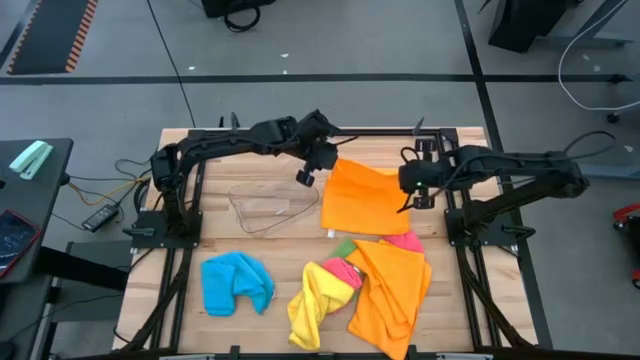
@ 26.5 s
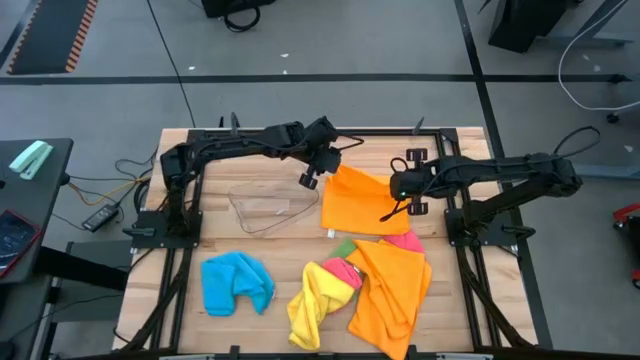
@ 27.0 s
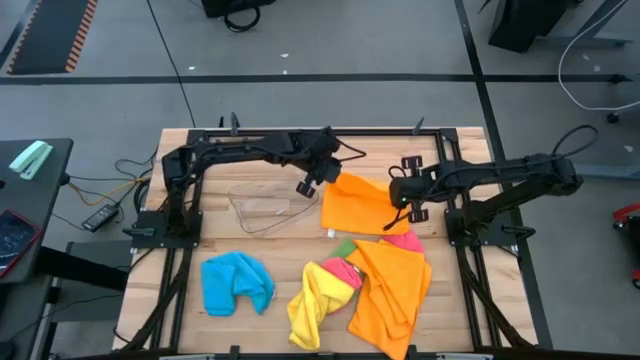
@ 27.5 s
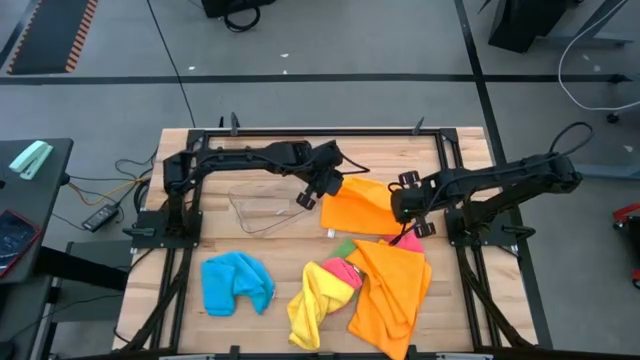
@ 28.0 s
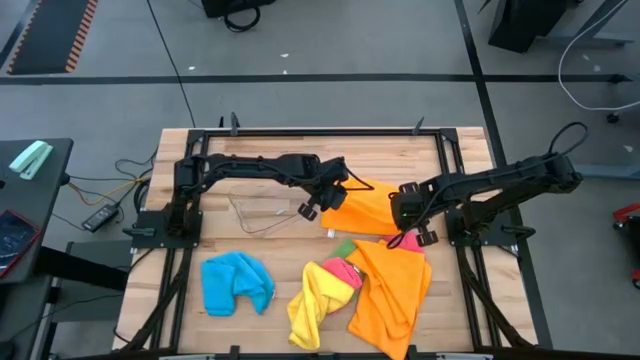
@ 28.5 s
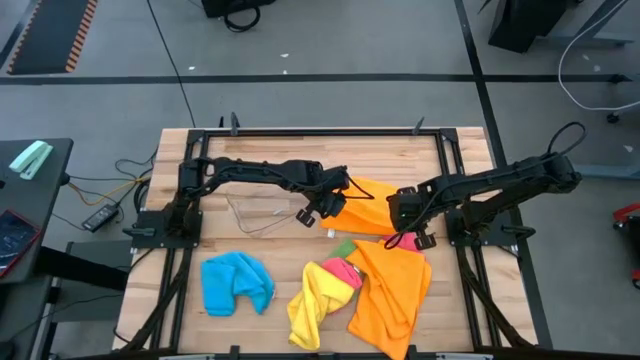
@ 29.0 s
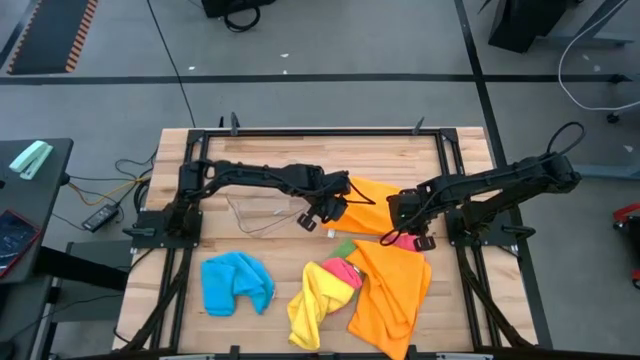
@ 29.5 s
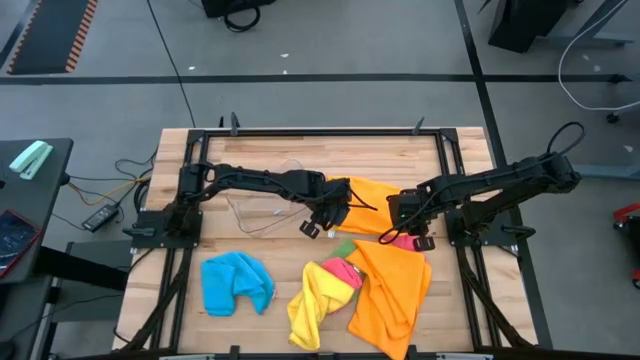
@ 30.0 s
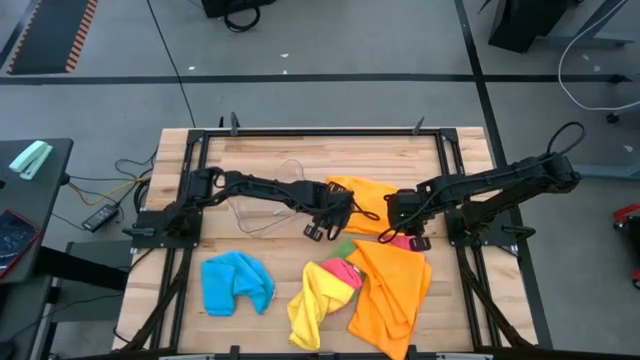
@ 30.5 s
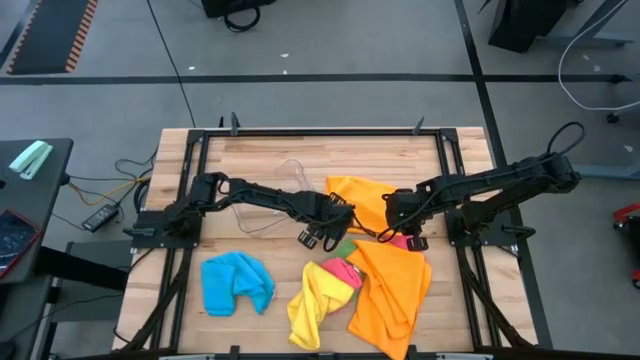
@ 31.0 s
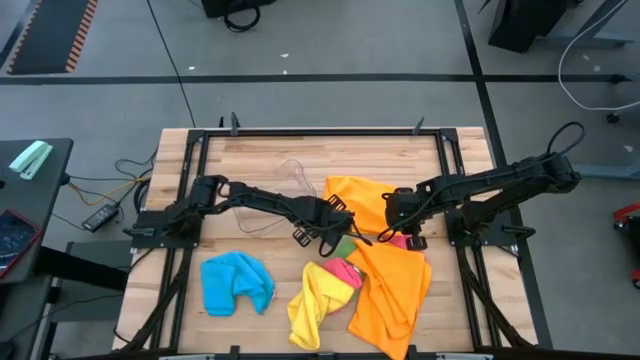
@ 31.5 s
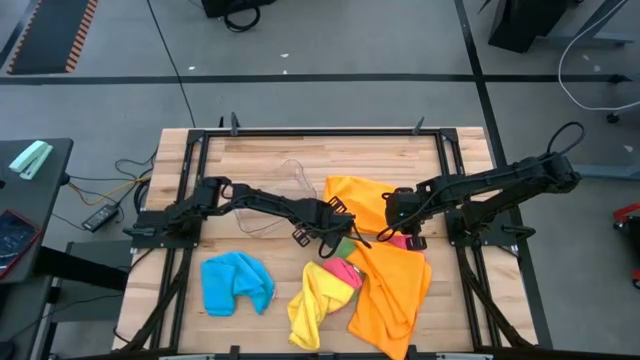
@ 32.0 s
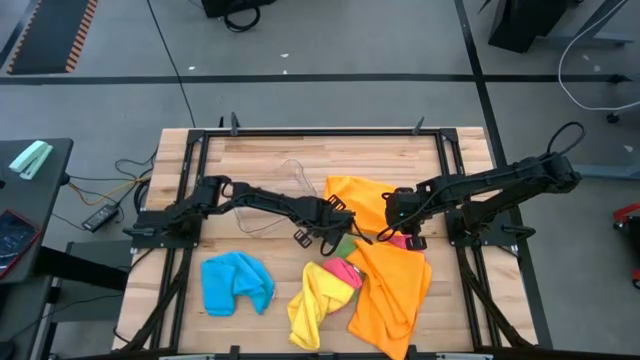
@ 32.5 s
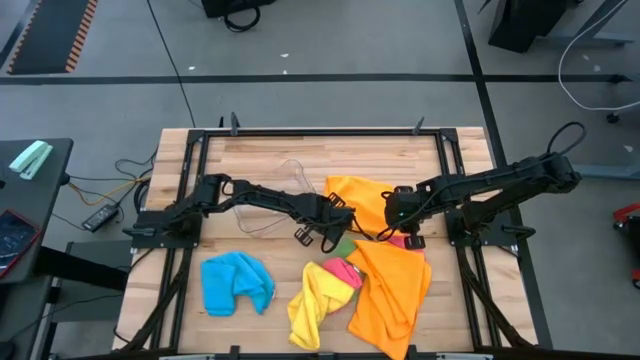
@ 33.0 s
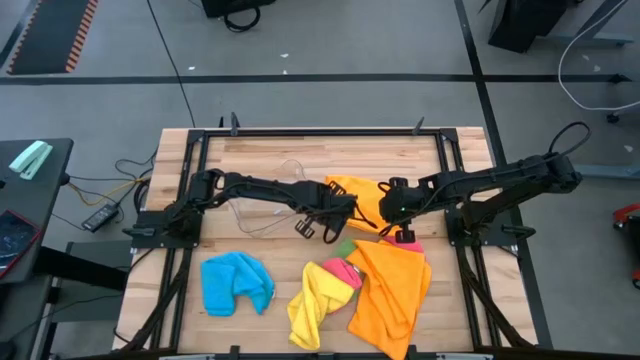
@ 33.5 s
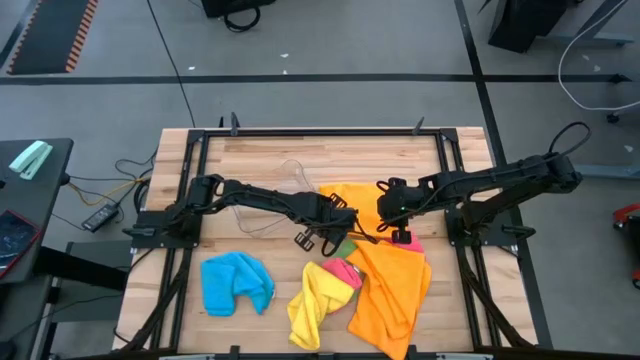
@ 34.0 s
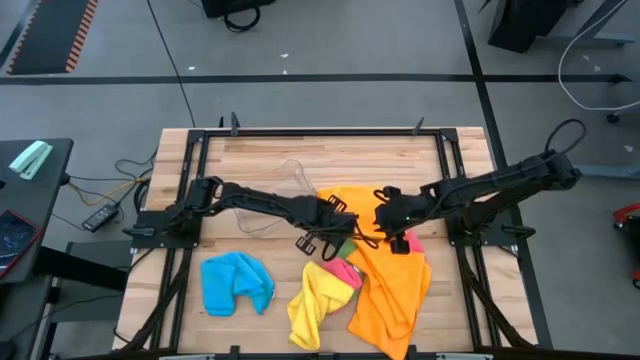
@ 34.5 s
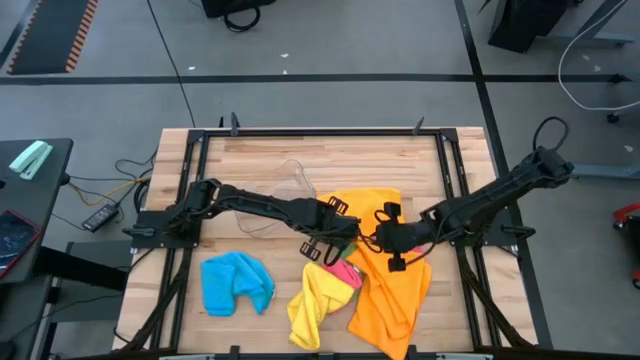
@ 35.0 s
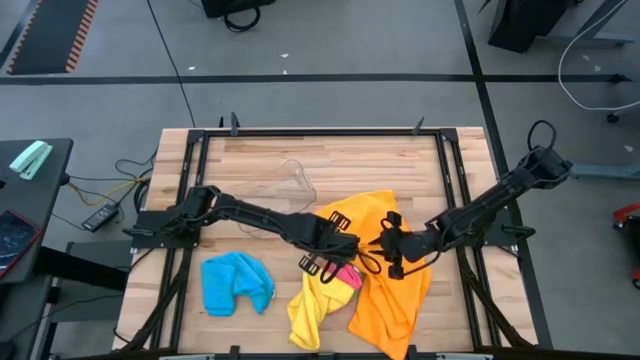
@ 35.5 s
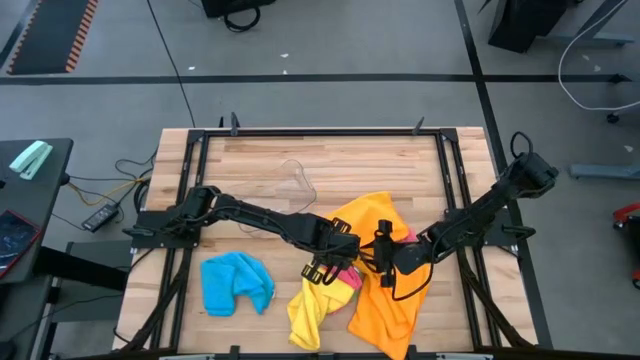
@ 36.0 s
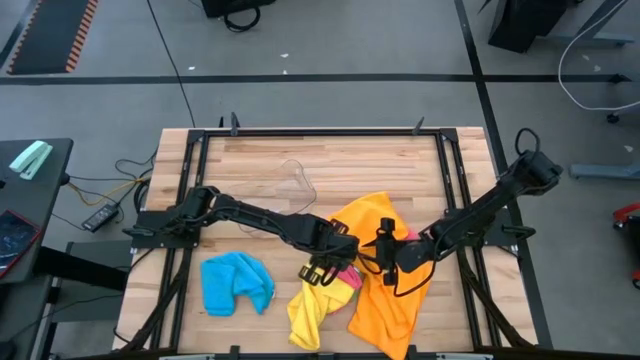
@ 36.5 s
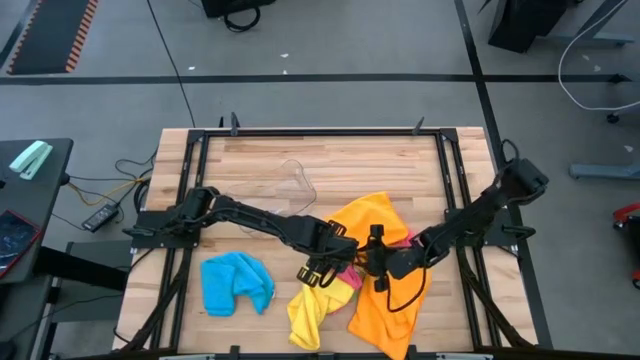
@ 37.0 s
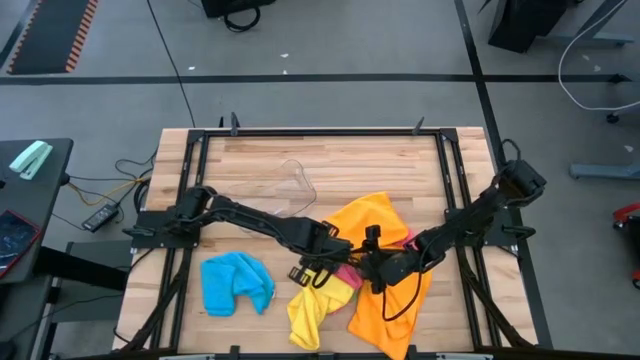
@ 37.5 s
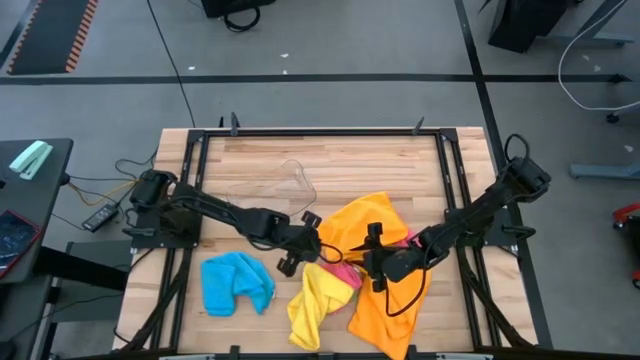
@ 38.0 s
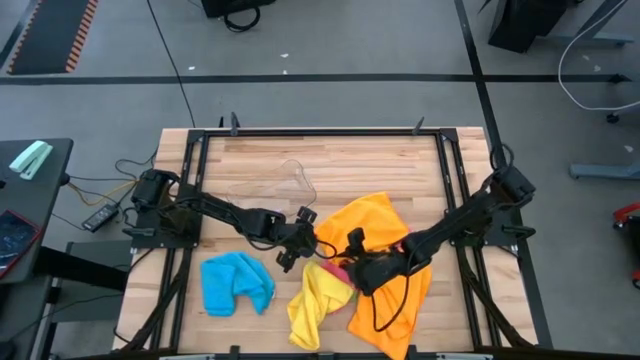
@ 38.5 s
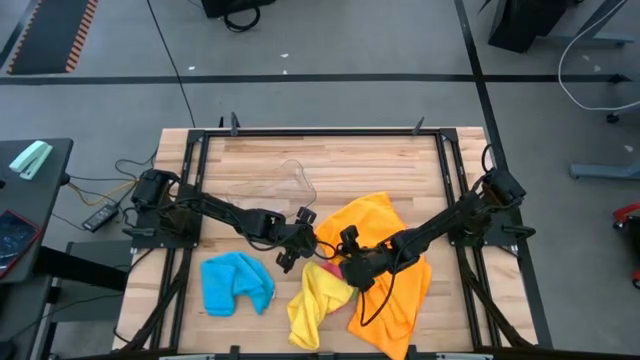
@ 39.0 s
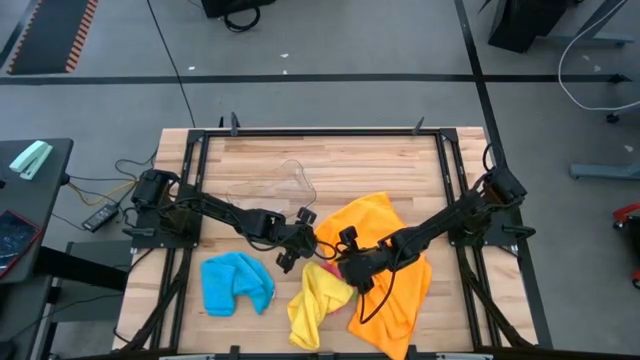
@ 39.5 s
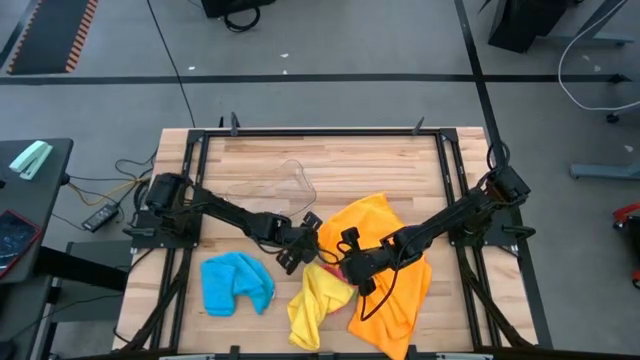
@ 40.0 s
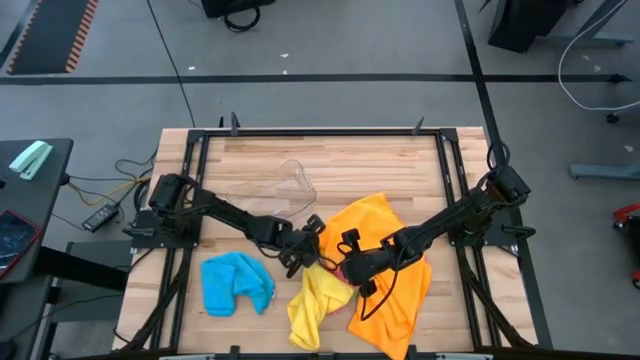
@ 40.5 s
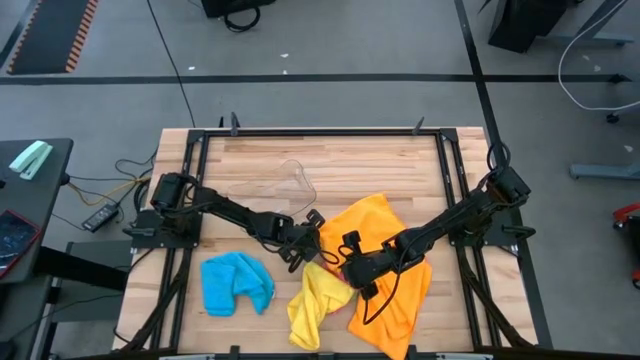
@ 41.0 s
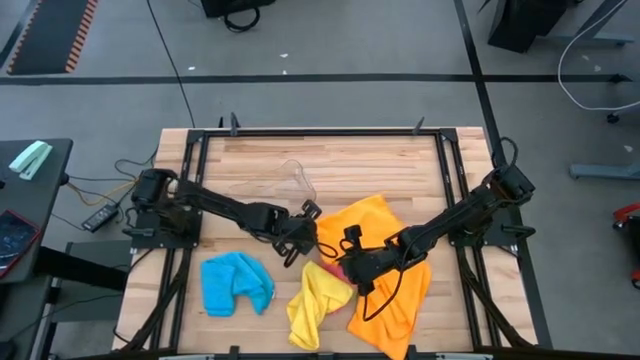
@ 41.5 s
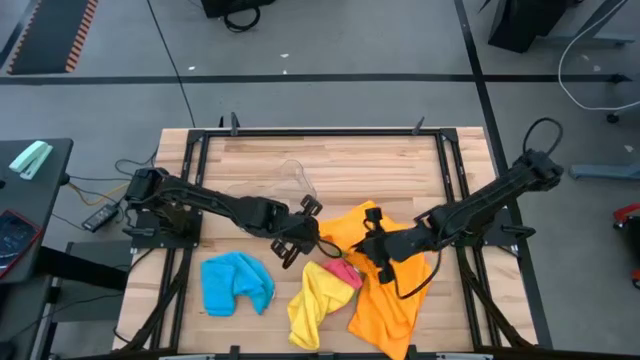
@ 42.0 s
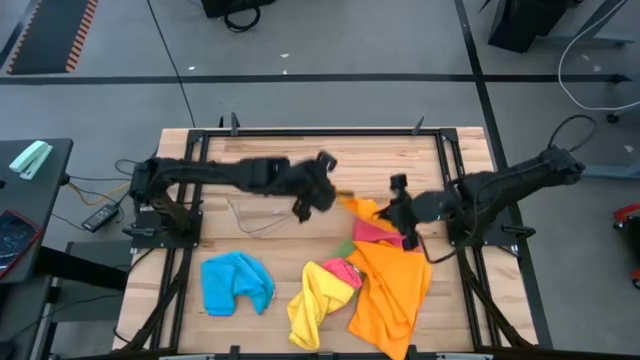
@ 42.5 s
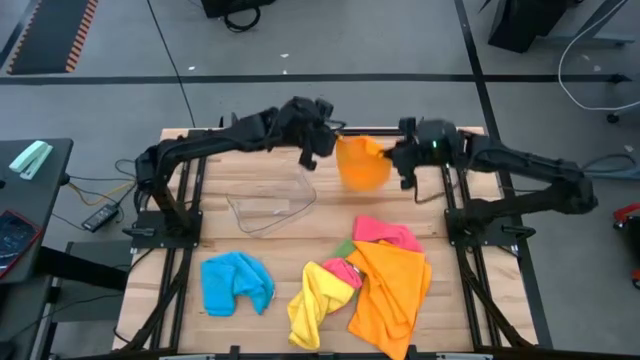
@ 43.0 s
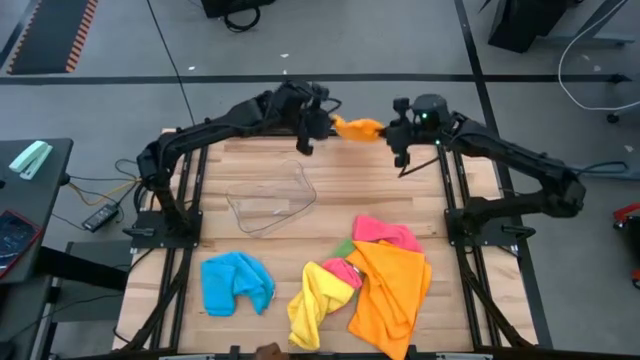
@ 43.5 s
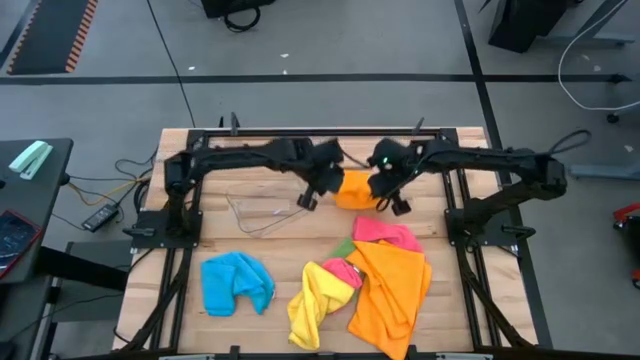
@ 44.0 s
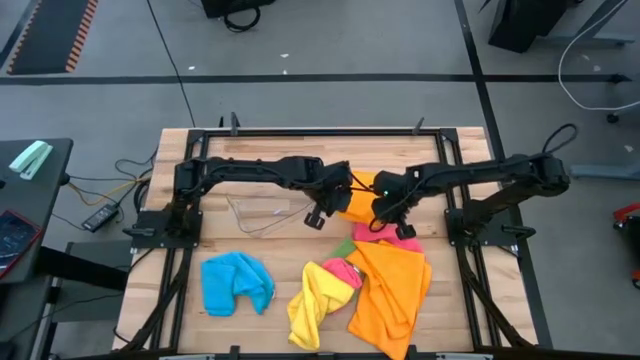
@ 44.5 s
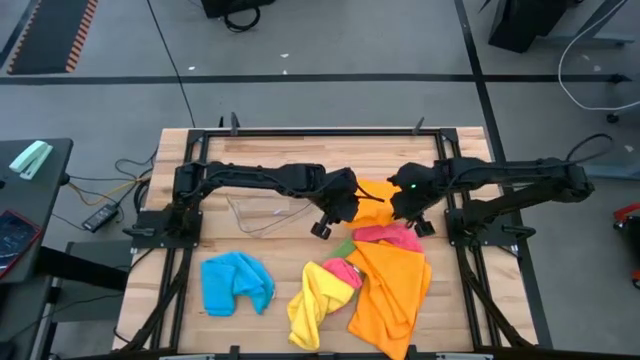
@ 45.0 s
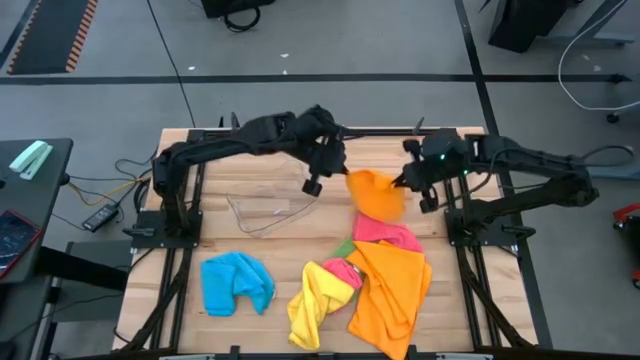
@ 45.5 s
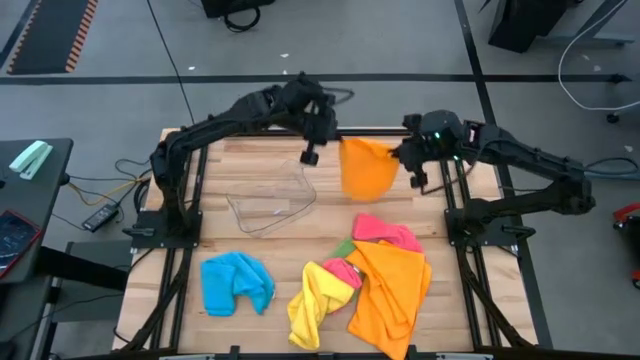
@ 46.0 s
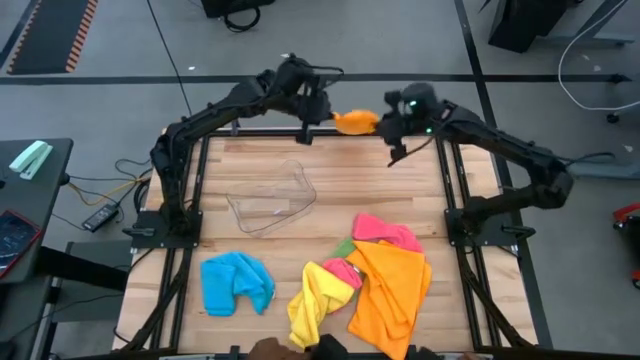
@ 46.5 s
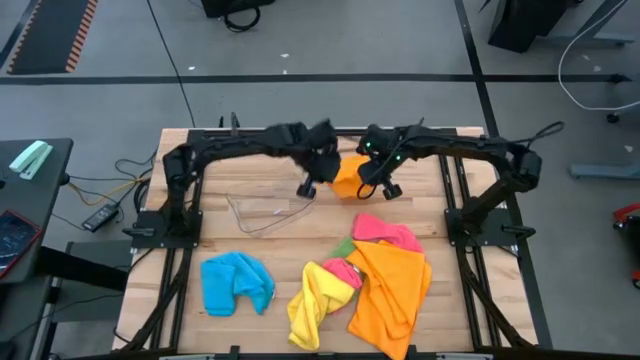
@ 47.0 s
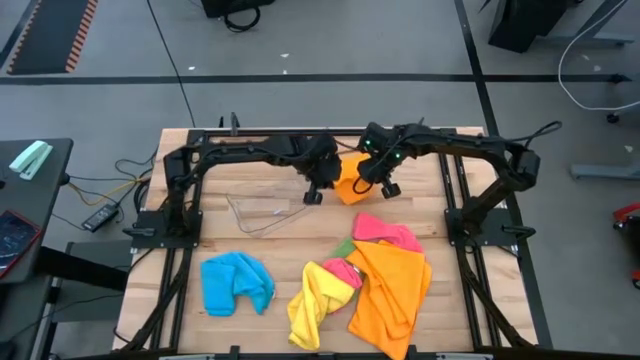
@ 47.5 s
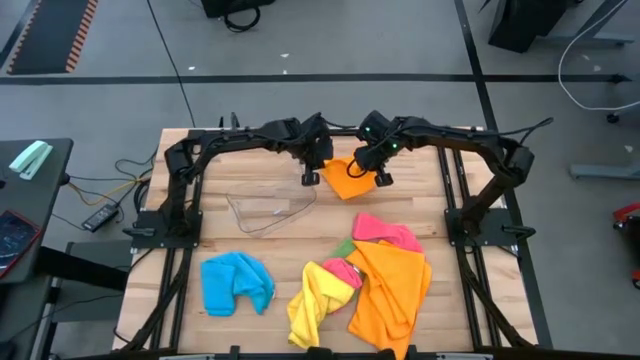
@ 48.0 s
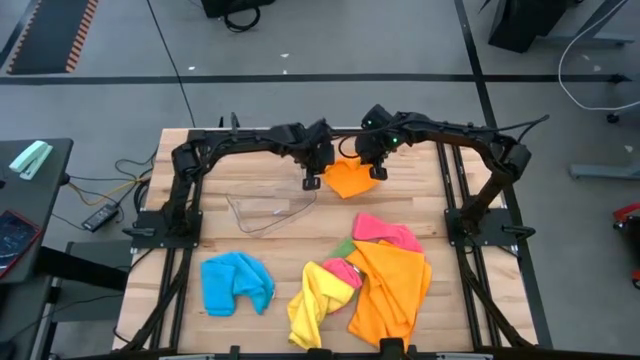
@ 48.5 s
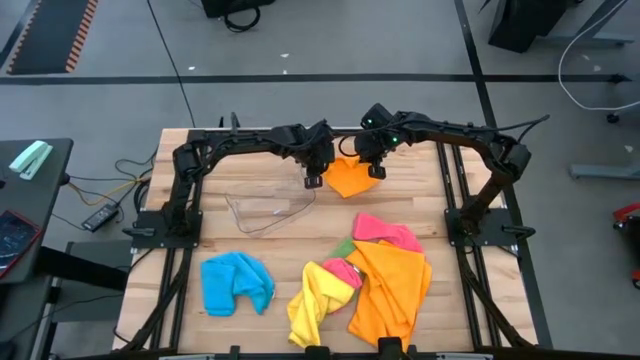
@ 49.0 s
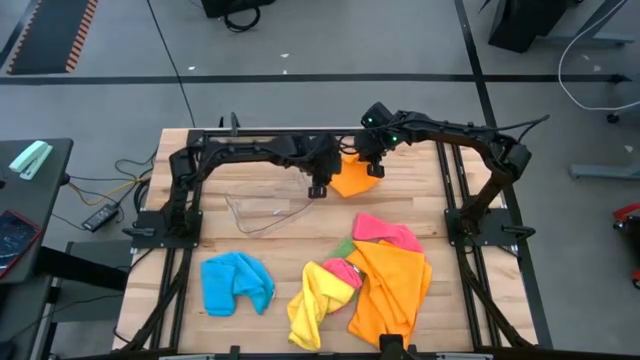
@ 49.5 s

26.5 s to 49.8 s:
Task: Fold microfiber towels
Fold the orange microfiber towel
